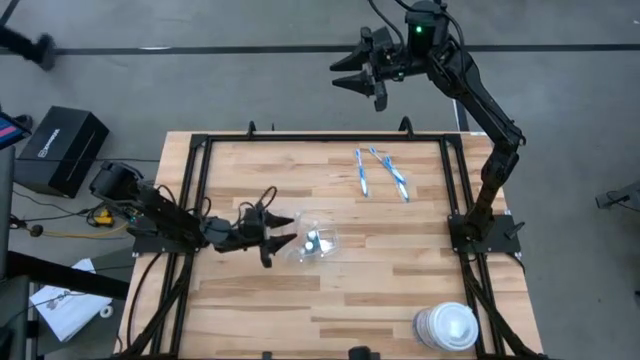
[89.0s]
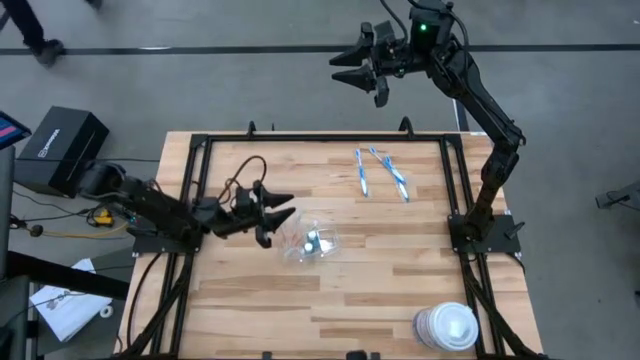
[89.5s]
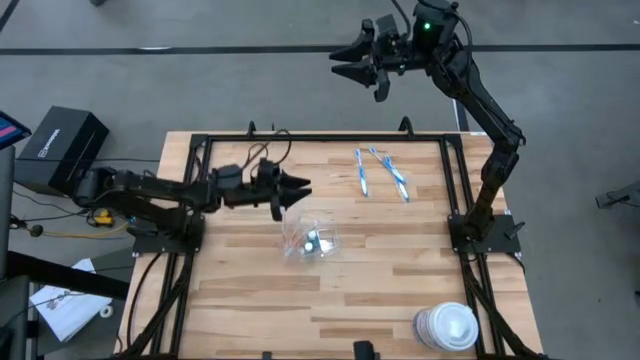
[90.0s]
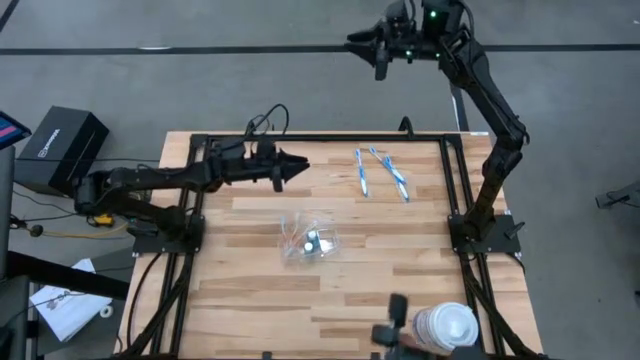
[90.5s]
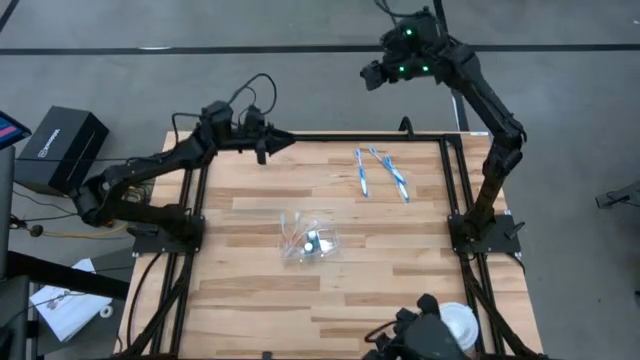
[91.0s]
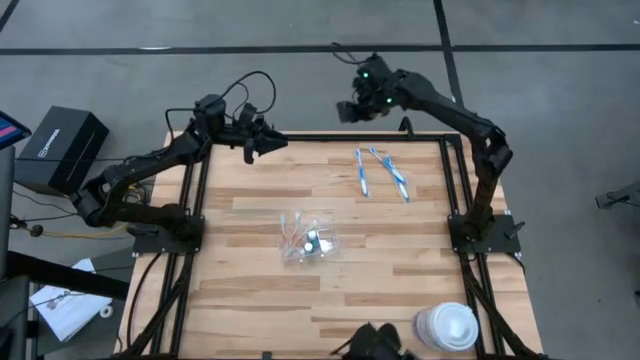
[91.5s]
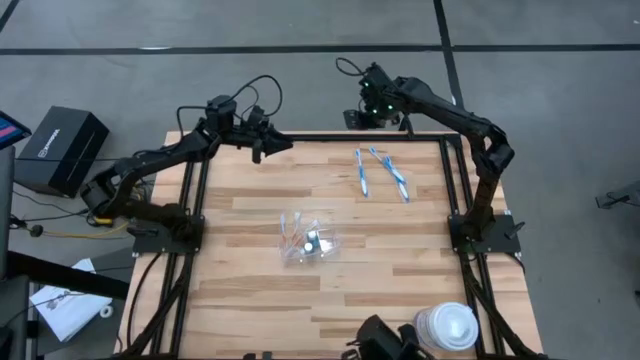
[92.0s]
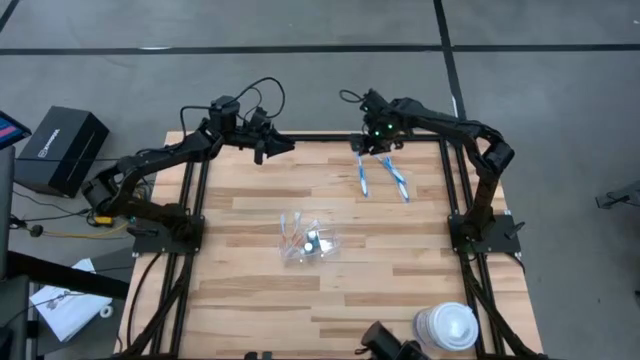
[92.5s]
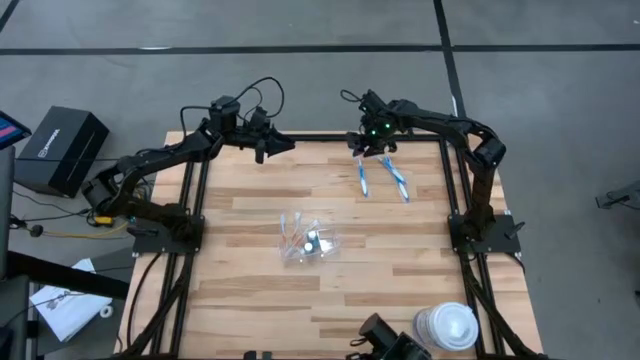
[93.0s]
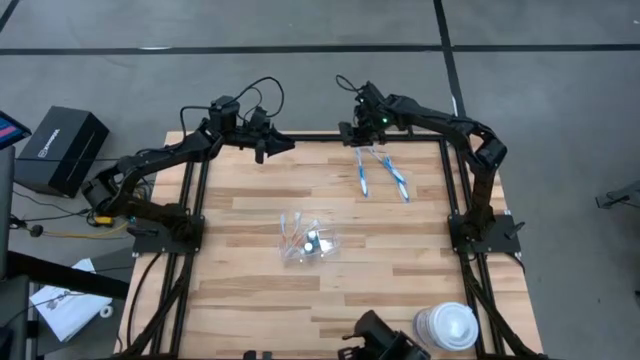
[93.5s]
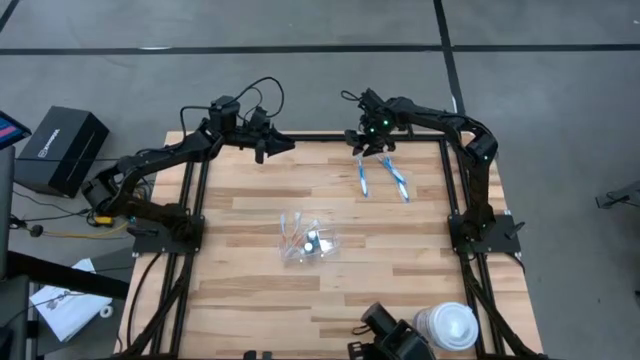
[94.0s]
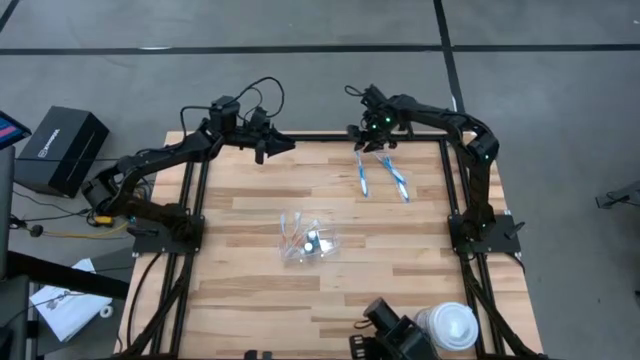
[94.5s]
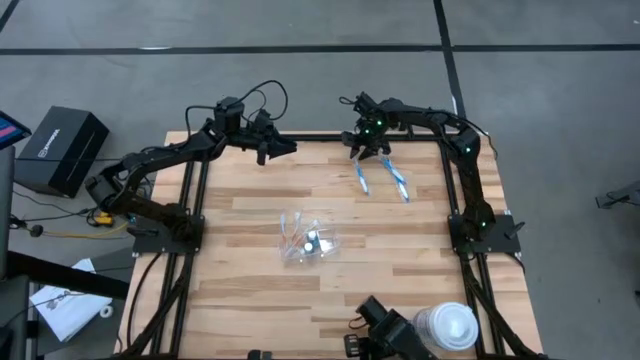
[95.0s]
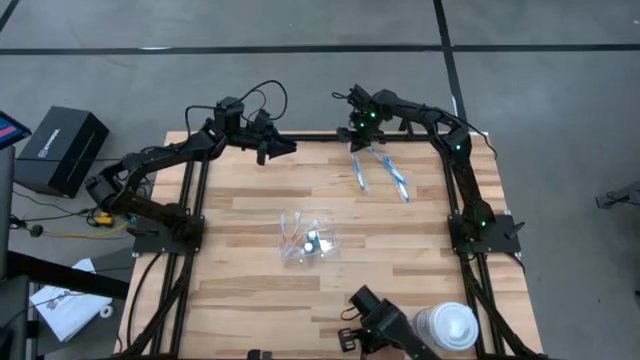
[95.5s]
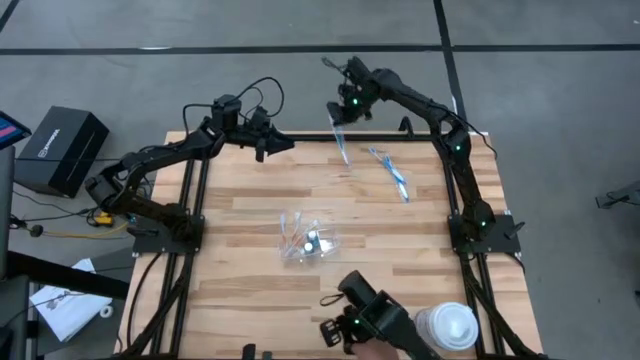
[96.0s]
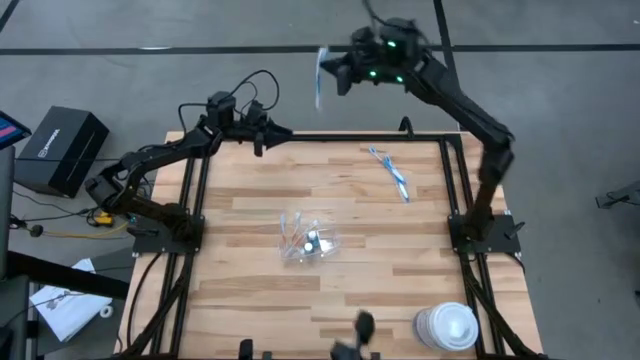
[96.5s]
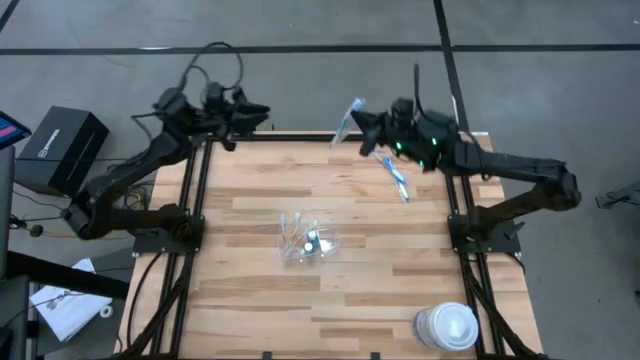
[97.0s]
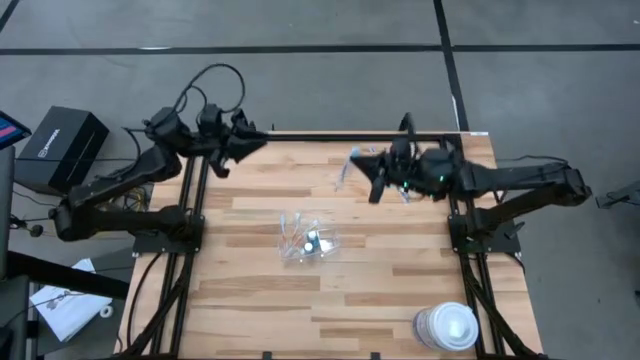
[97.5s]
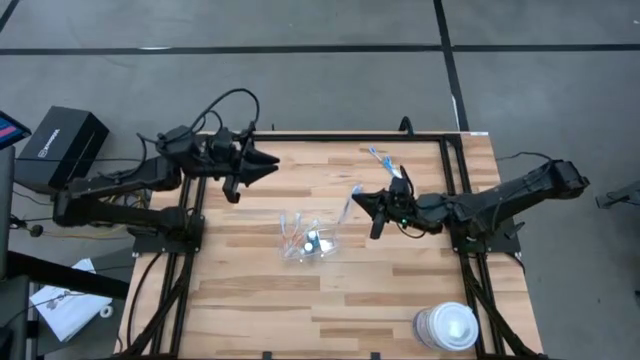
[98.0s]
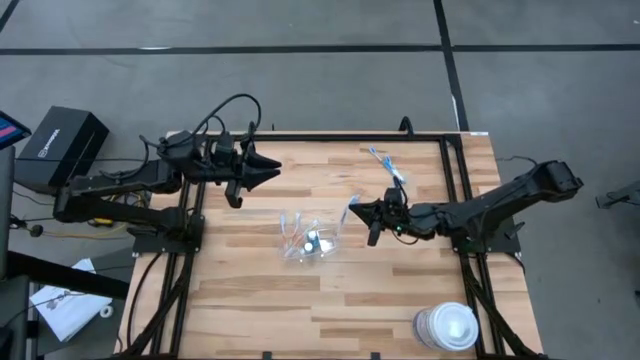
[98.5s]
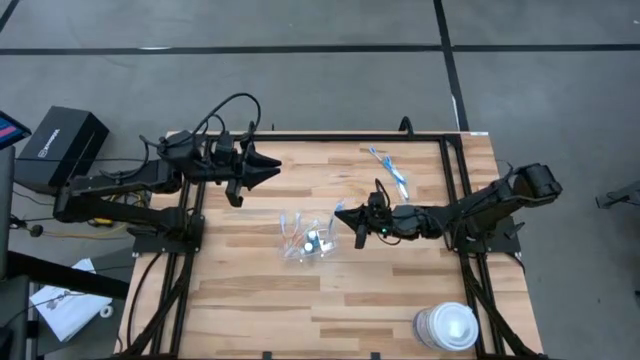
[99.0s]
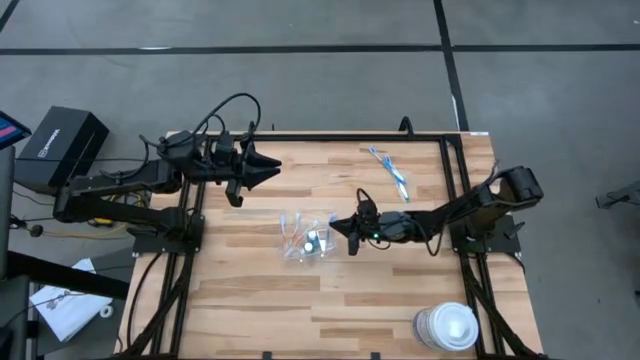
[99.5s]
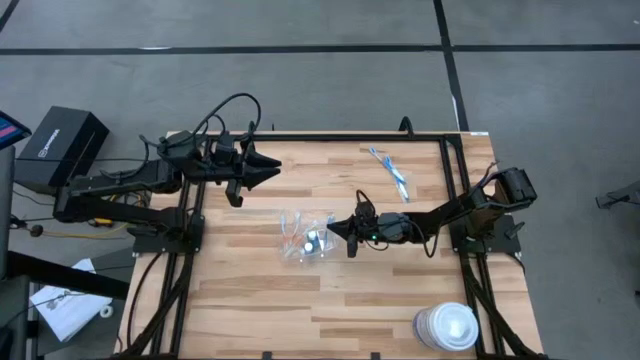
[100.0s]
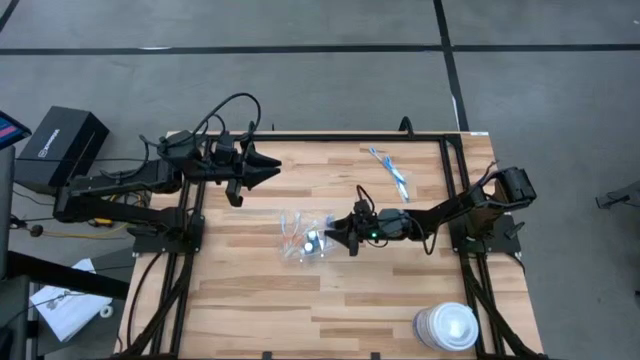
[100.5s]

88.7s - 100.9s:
Task: Pick & Place toothbrushing station
Put the top left blue toothbrush into the transparent organizer

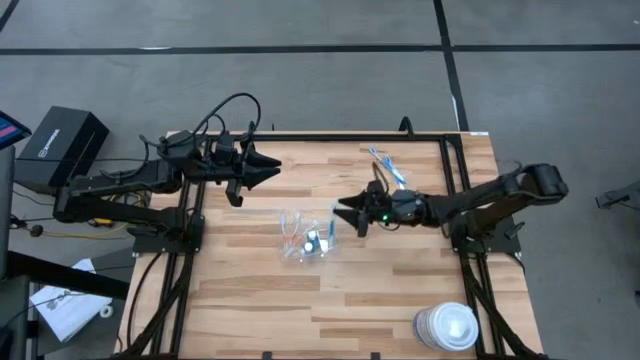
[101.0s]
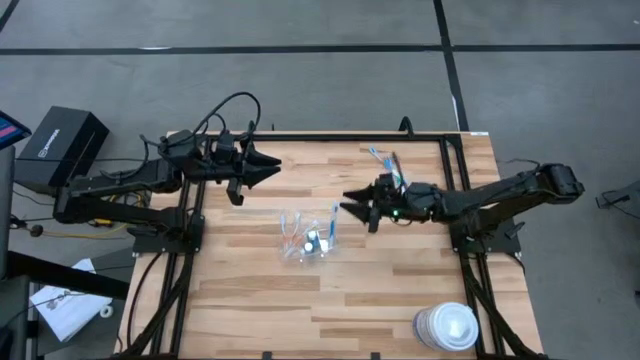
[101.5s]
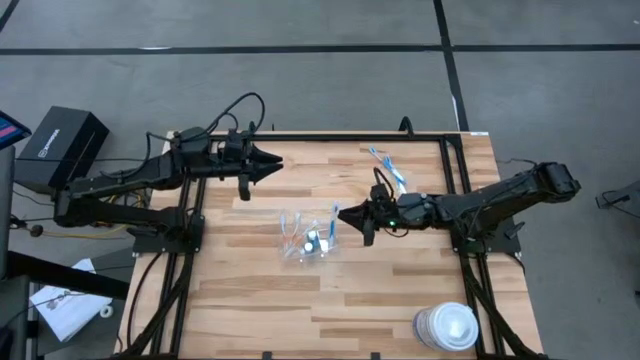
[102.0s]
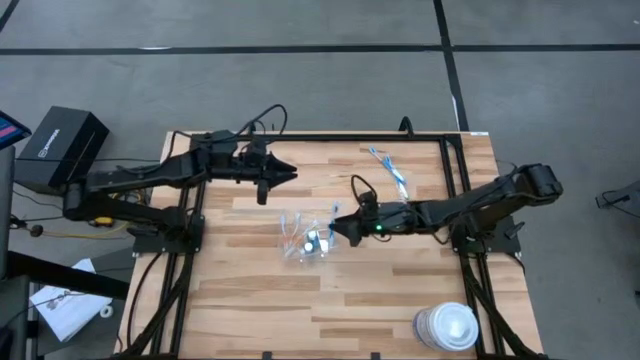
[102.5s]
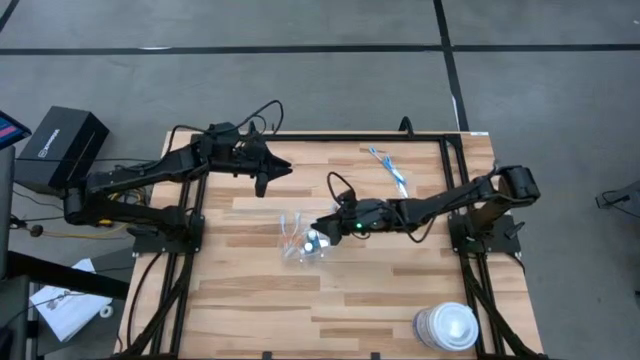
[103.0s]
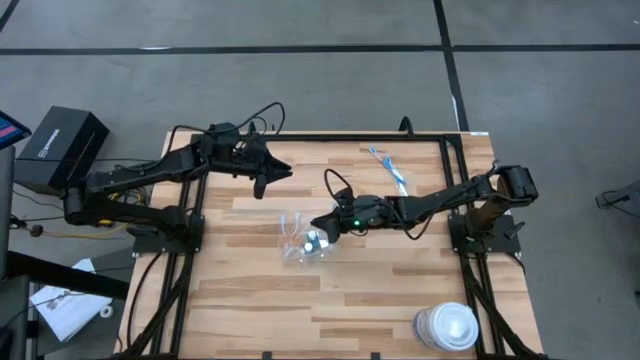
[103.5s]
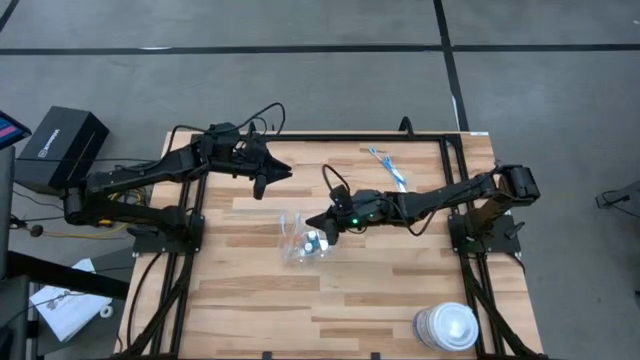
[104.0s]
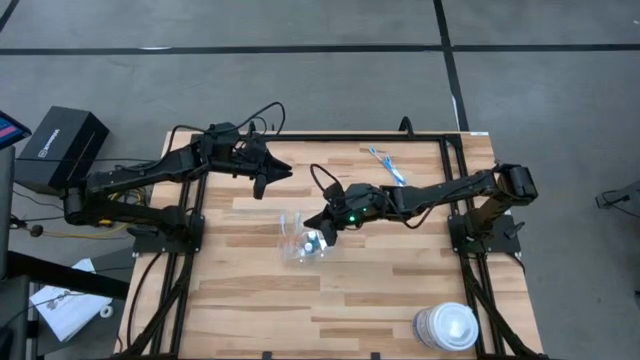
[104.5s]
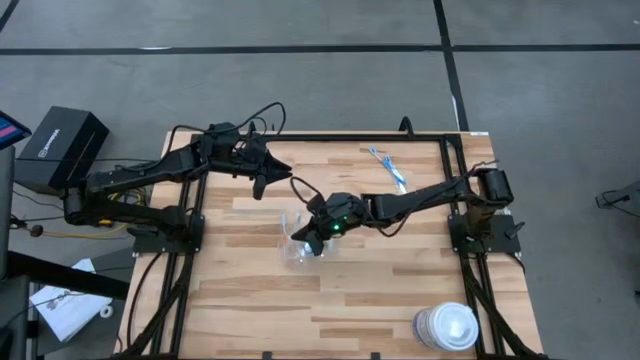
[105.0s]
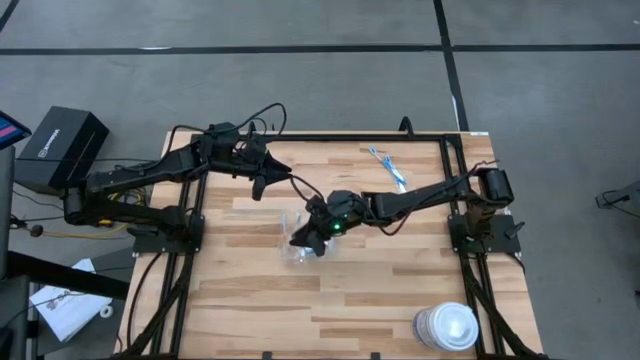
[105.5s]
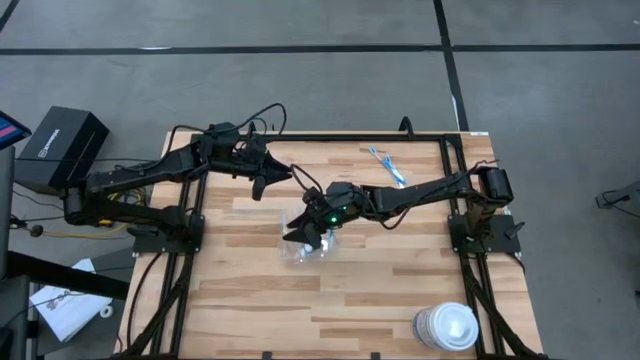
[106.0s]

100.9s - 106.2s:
Adjust the orange toothbrush into the transparent organizer

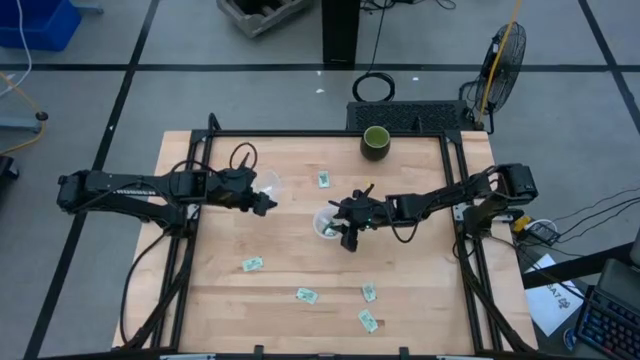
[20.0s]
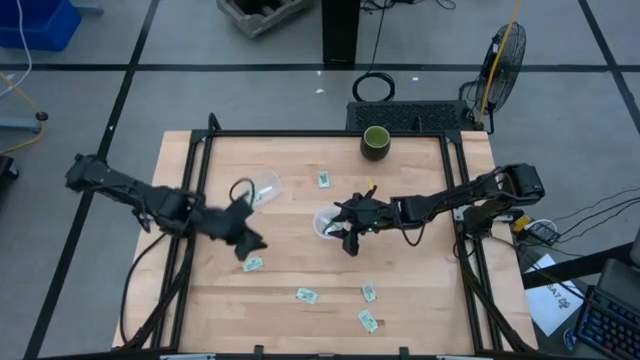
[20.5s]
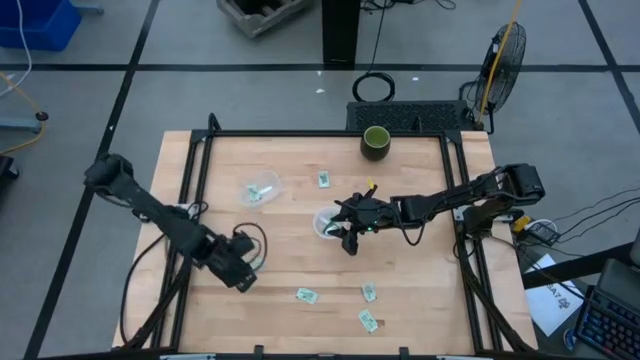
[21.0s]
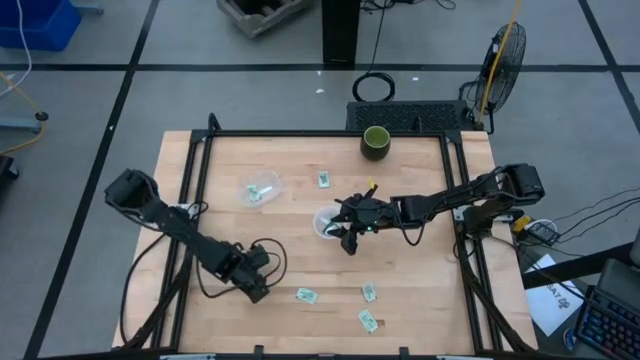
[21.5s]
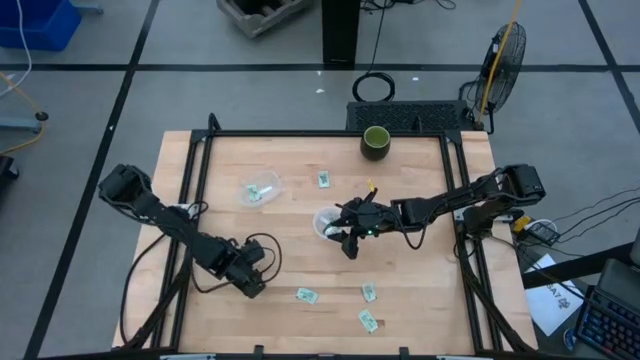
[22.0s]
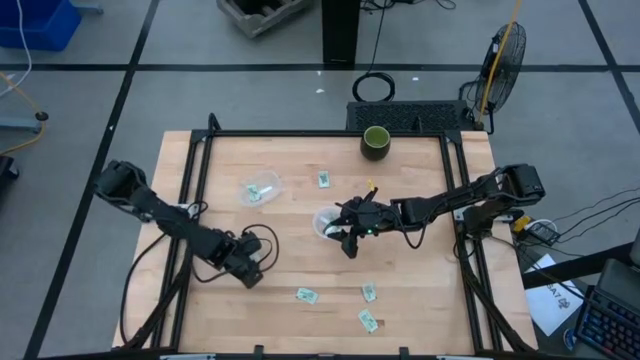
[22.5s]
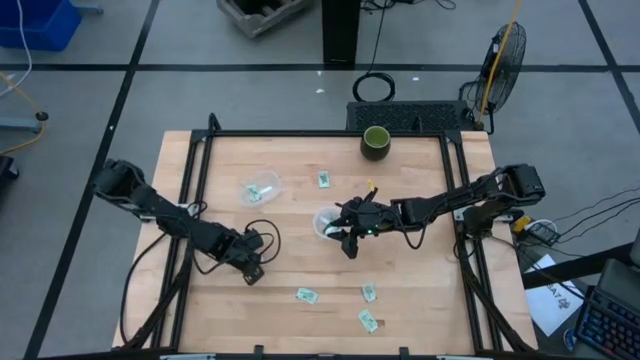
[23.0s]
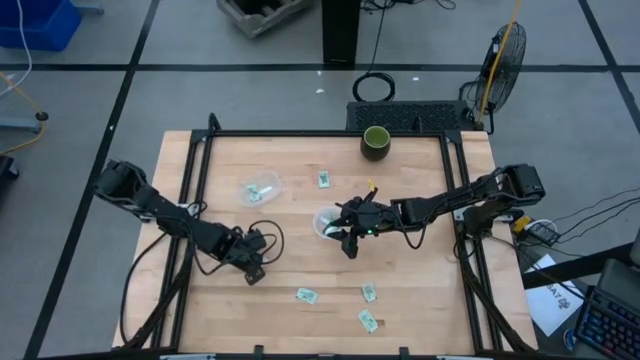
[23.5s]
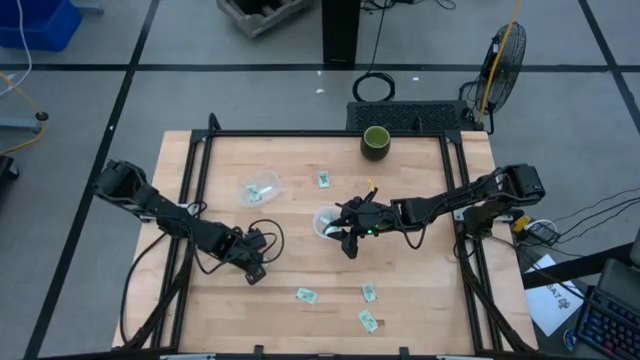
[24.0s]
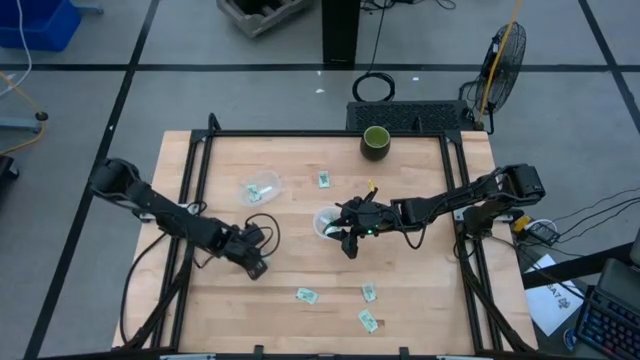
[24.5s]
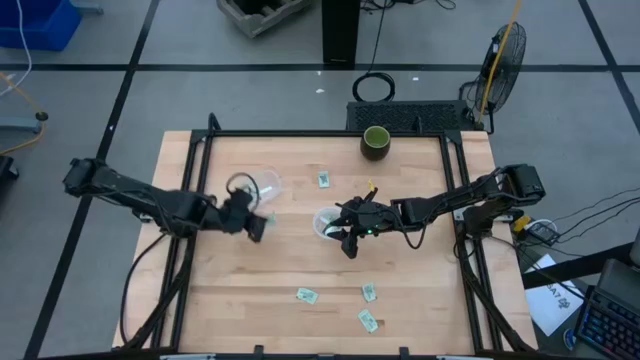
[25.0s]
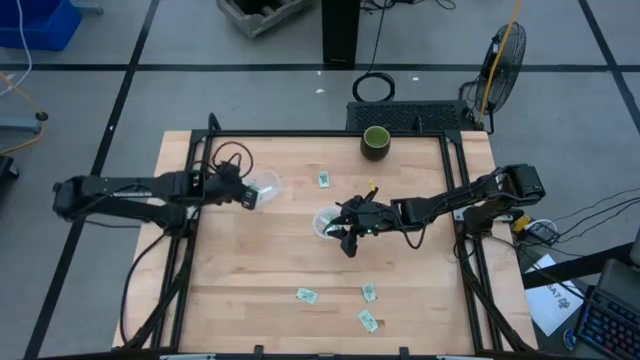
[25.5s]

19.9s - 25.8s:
Task: Pick and place items into bin
Put the stevia packet into the left transparent bin
